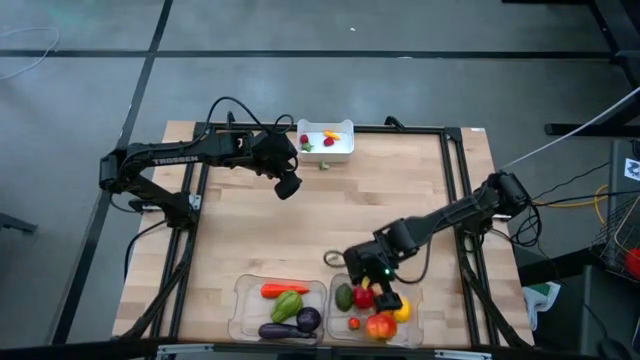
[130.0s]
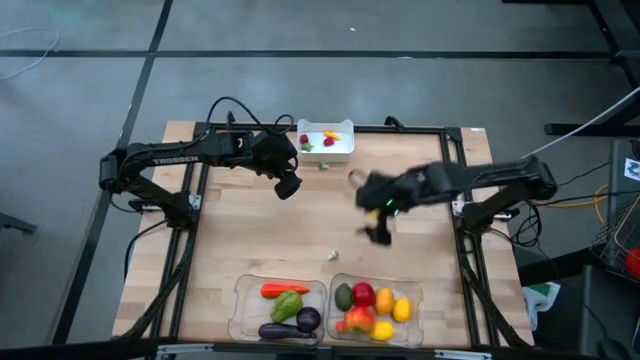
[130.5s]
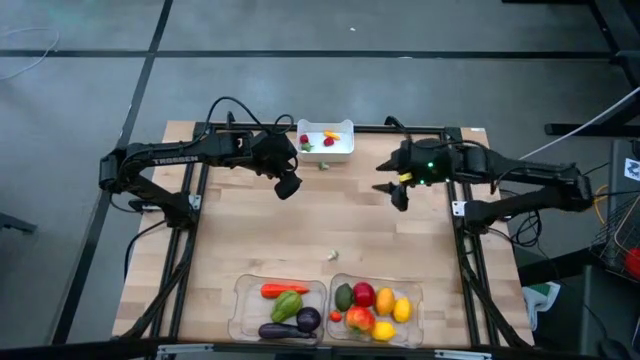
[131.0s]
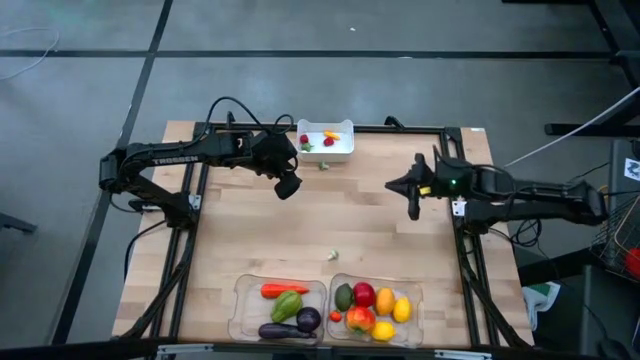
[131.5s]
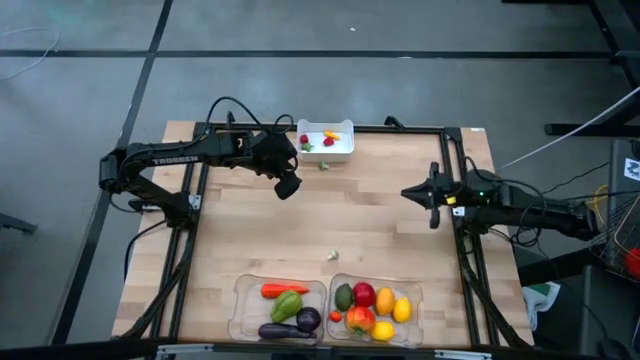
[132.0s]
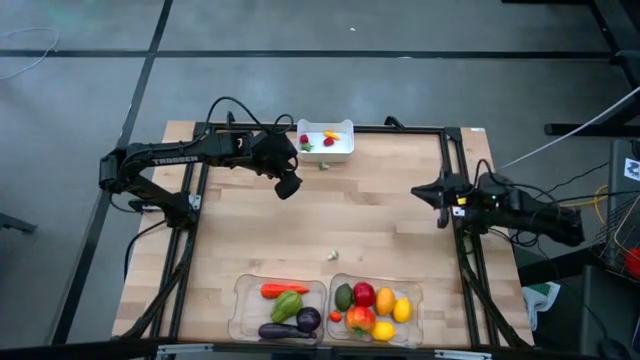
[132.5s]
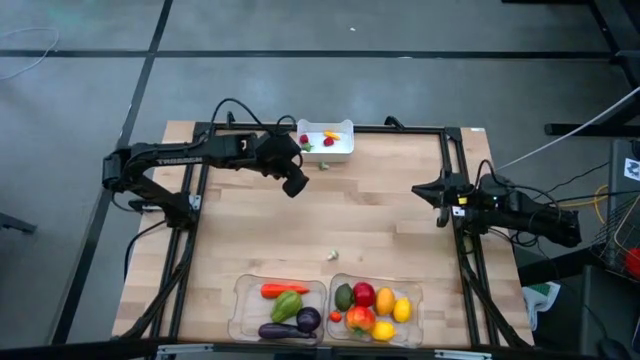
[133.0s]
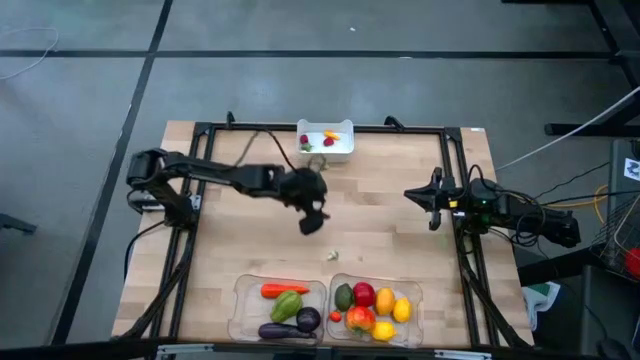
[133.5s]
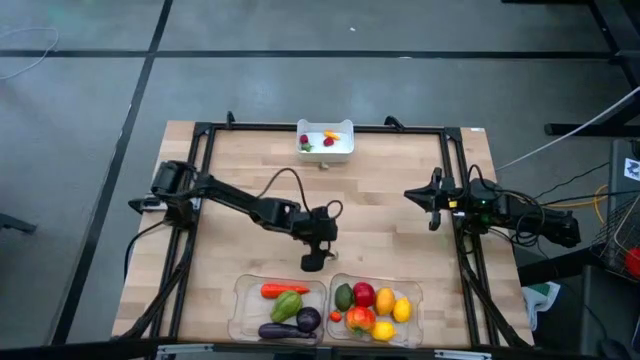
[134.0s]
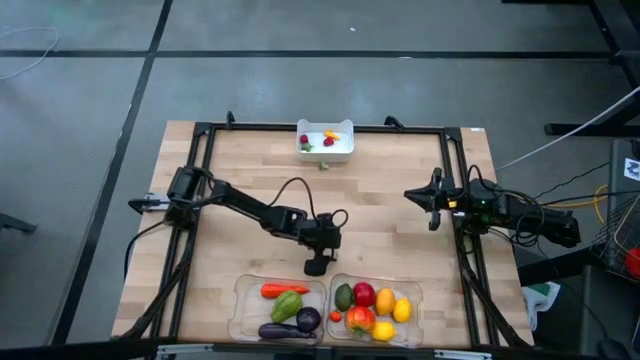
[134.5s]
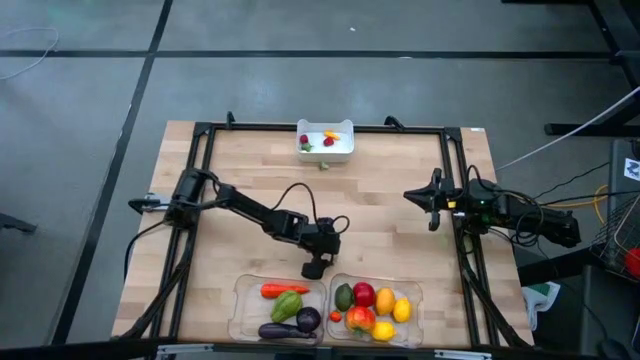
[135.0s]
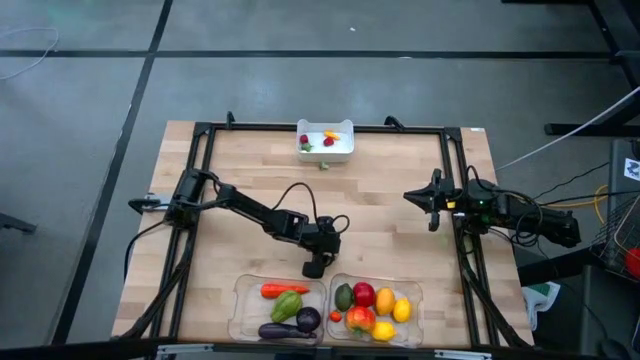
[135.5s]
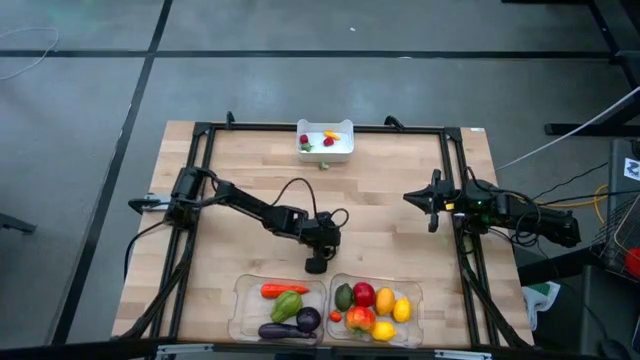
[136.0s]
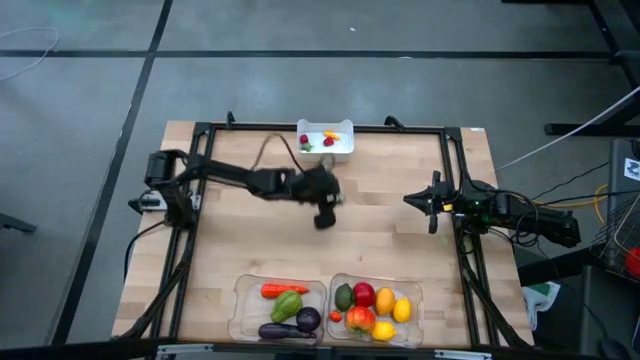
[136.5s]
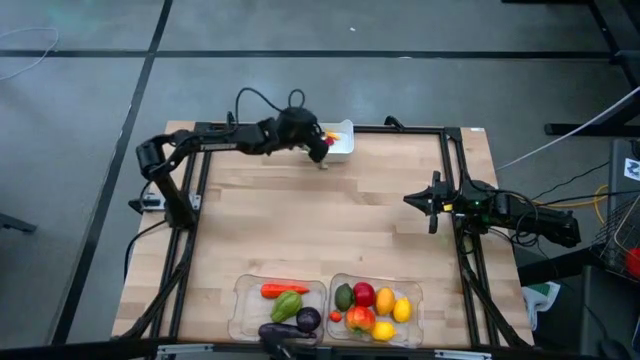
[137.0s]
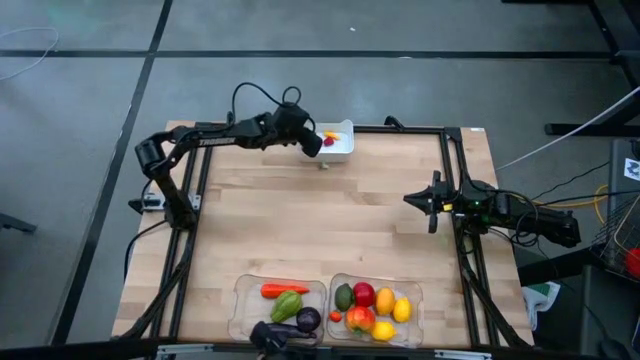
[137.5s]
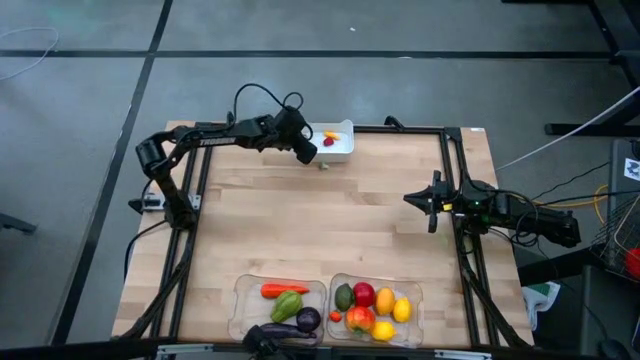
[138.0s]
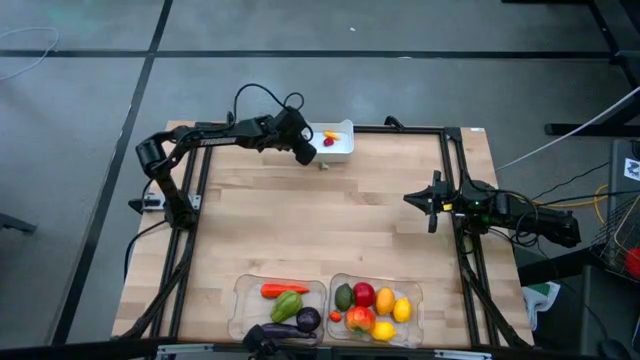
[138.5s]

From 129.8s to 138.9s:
Task: Sort produce into baskets
Put the bottom green mushroom into the white bin

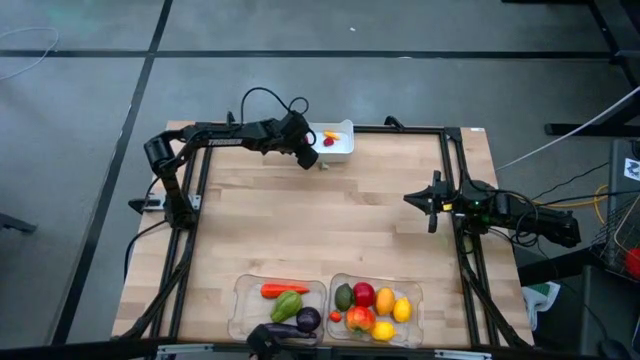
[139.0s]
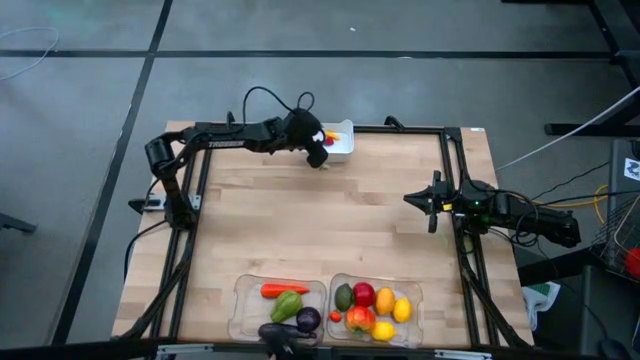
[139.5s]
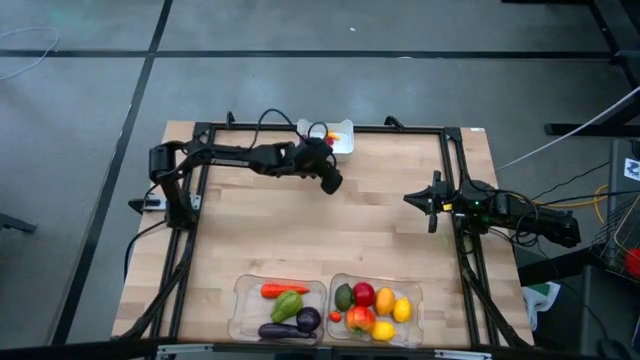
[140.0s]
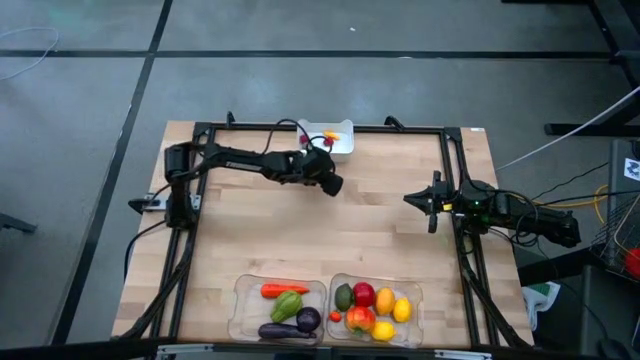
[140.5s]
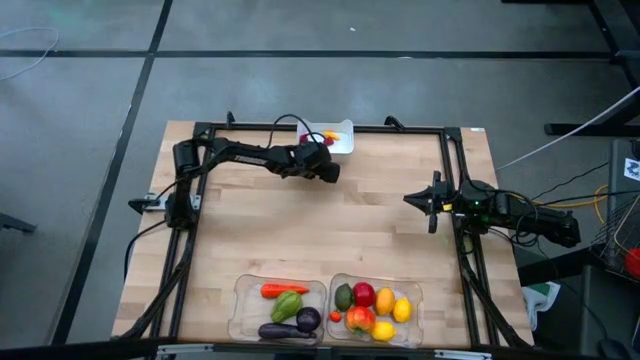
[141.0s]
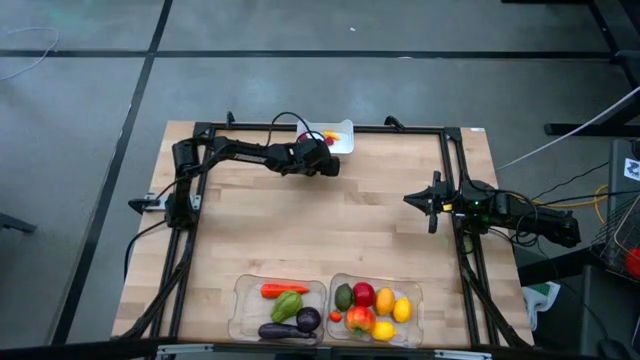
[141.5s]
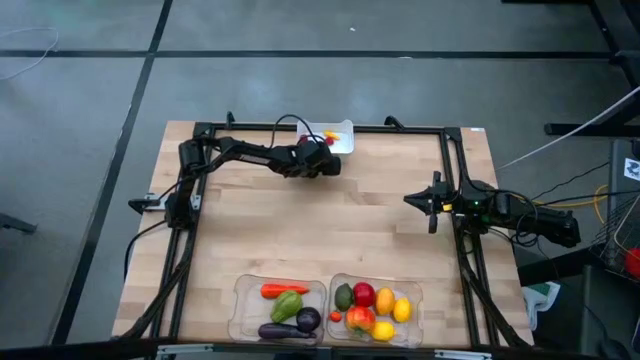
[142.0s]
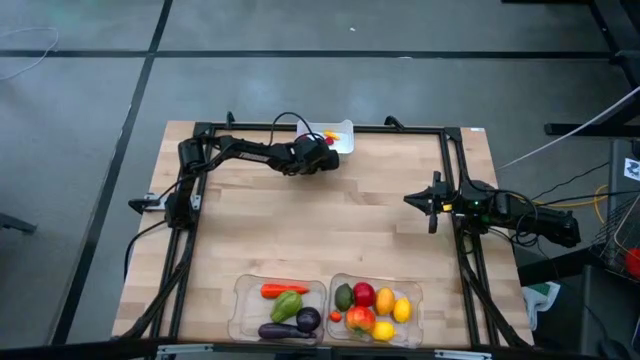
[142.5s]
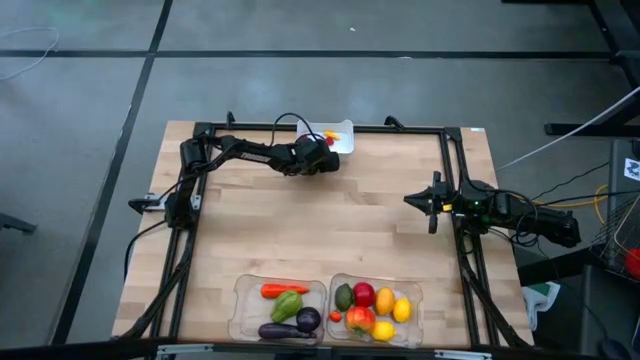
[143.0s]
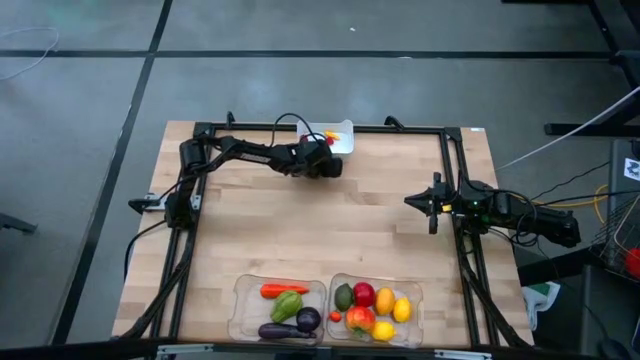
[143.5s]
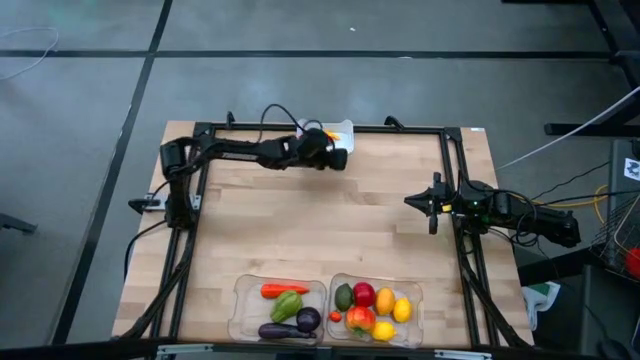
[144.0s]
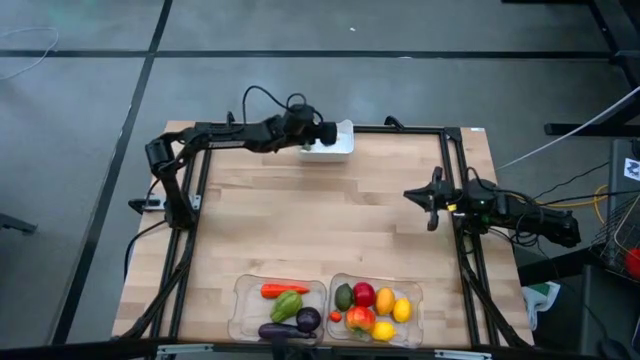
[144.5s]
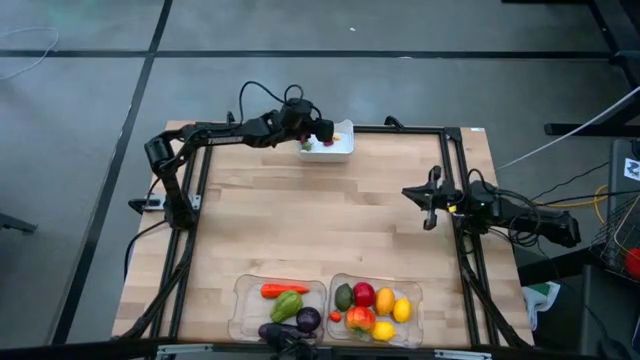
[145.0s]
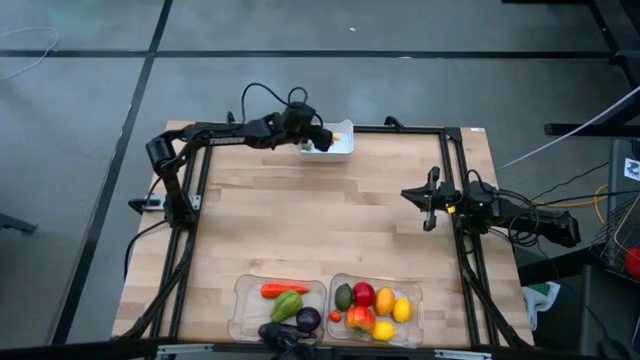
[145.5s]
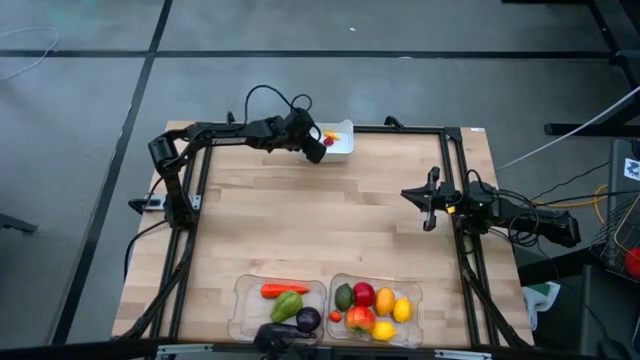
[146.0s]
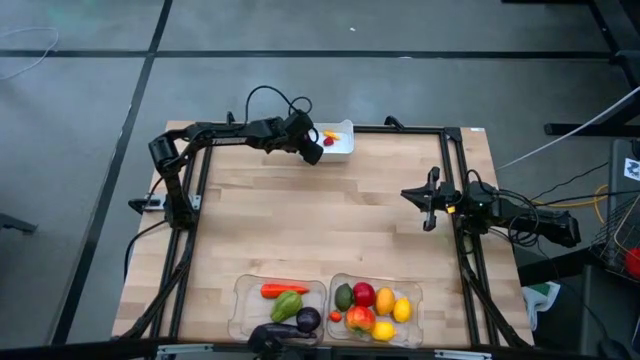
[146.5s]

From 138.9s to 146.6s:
Put the green mushroom into the white bin

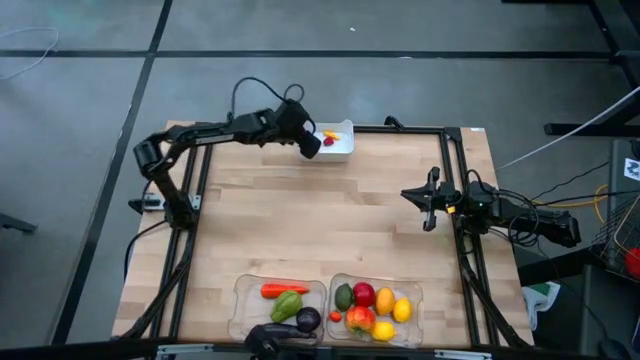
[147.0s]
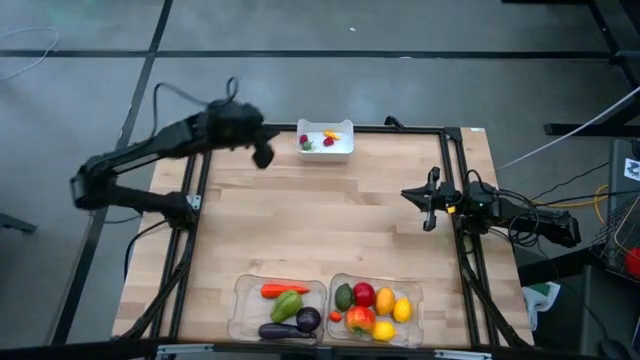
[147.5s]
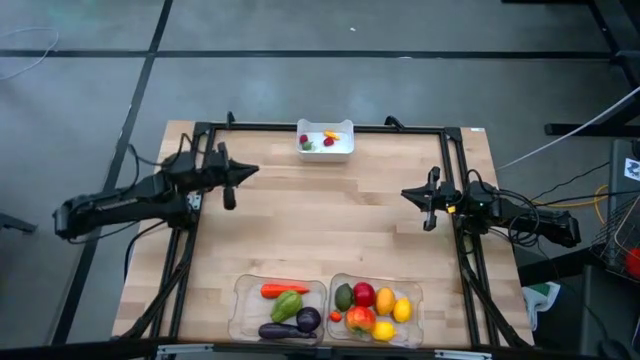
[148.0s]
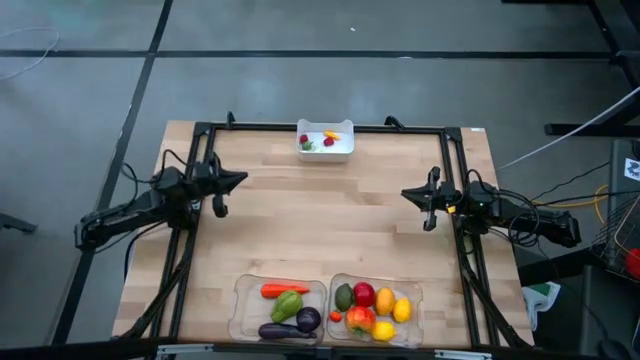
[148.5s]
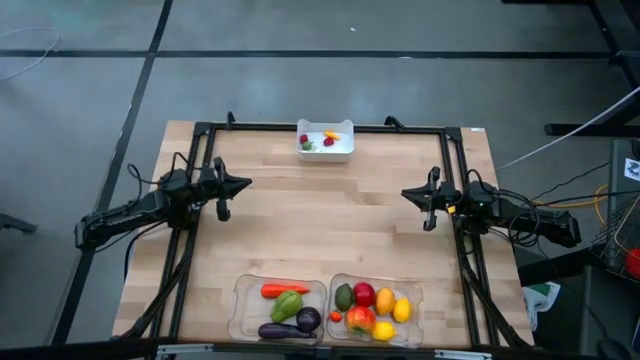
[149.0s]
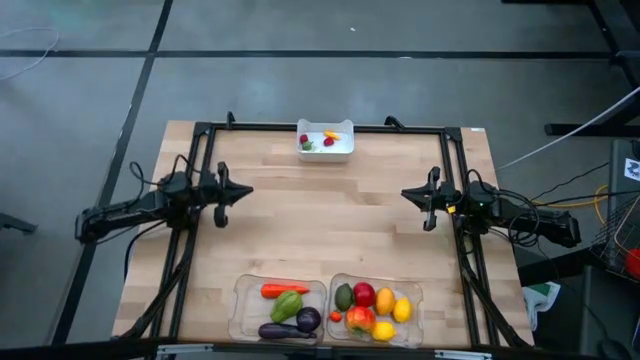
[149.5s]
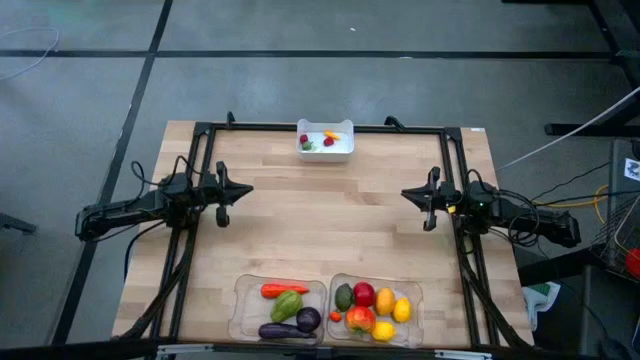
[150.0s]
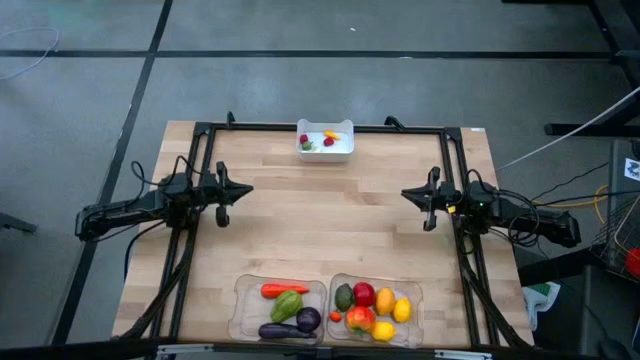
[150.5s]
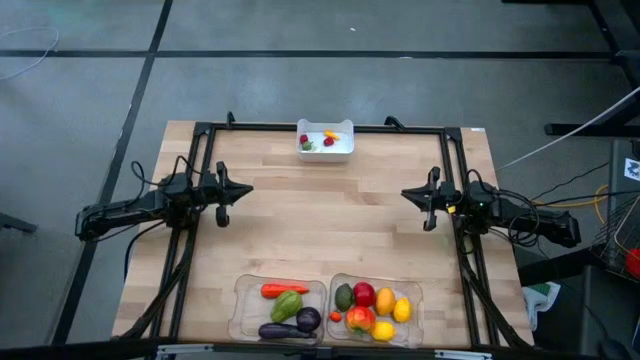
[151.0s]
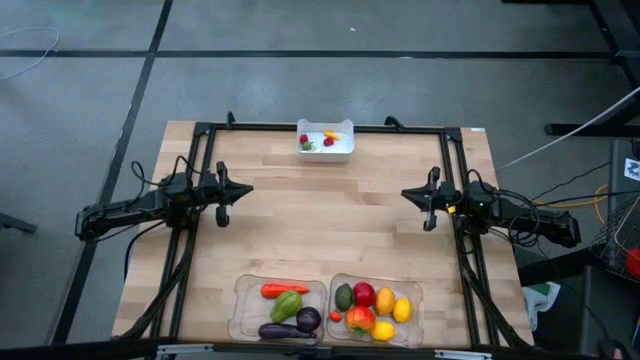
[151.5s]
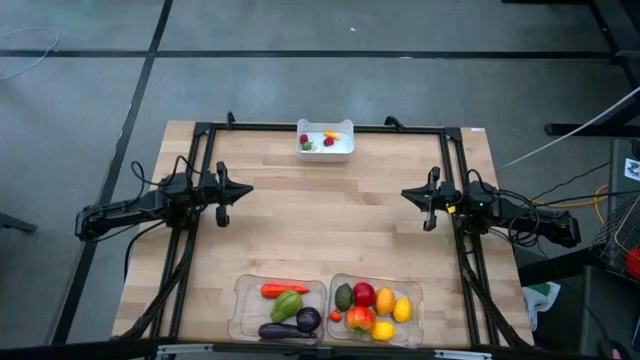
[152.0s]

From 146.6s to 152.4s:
Return to Home Position
